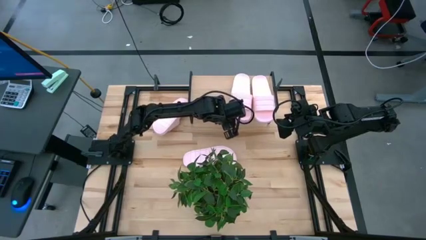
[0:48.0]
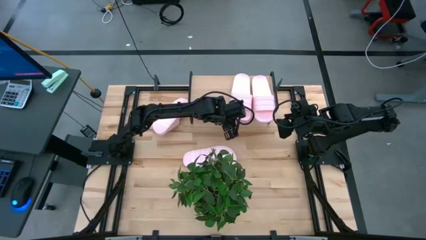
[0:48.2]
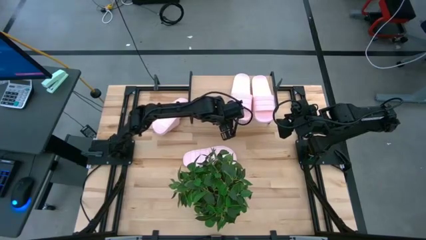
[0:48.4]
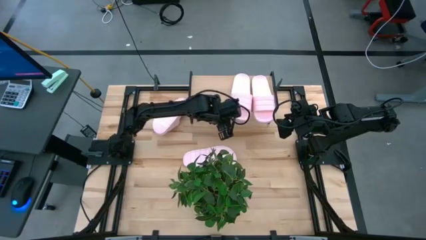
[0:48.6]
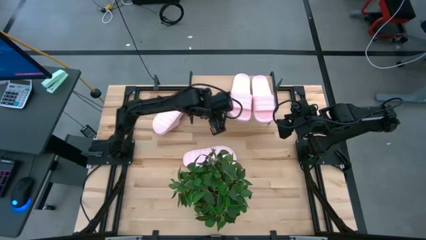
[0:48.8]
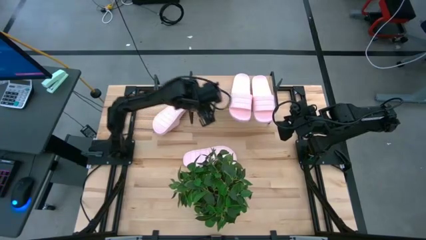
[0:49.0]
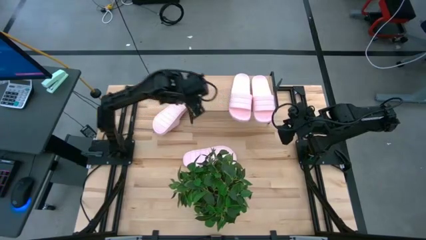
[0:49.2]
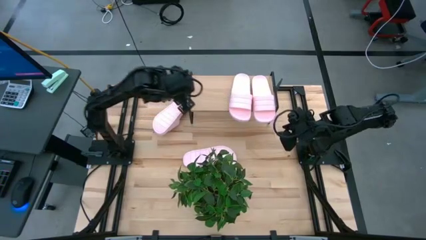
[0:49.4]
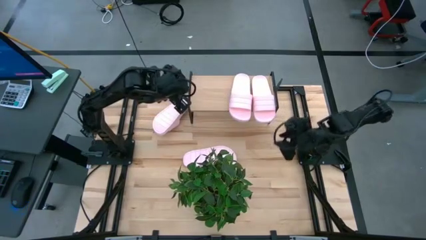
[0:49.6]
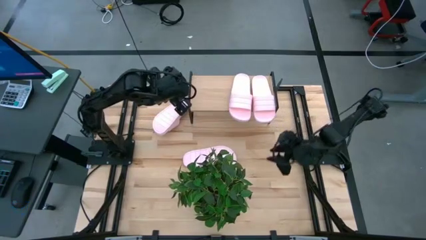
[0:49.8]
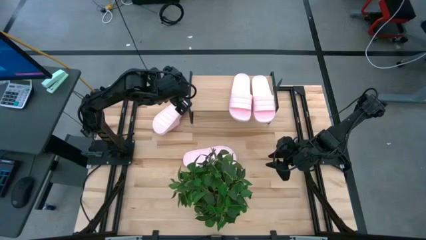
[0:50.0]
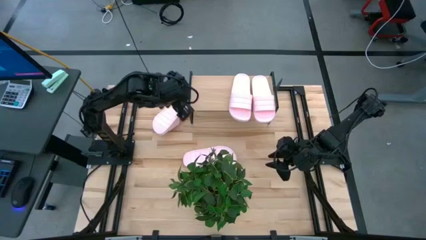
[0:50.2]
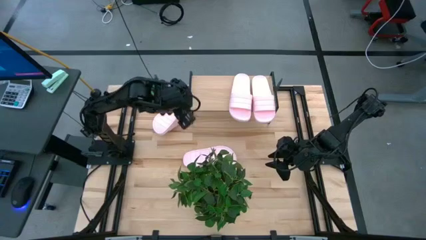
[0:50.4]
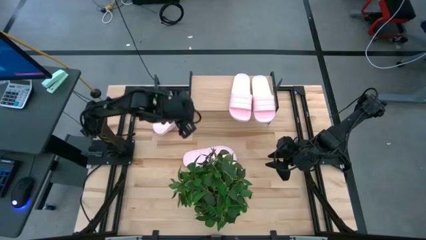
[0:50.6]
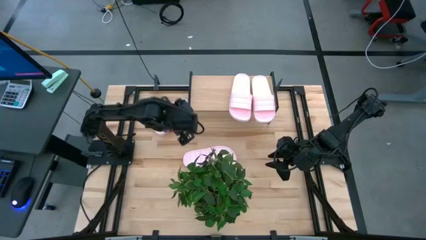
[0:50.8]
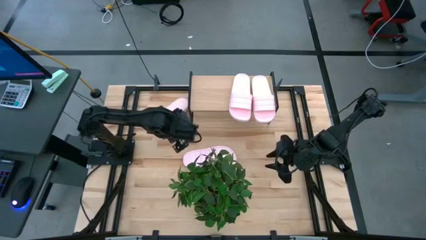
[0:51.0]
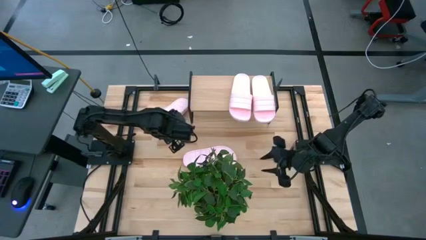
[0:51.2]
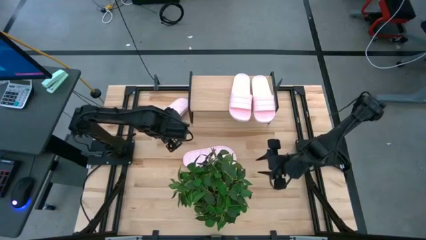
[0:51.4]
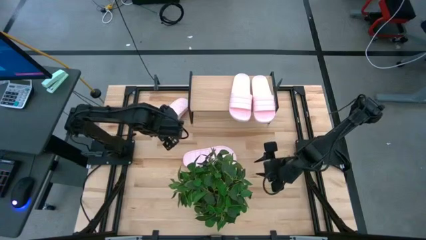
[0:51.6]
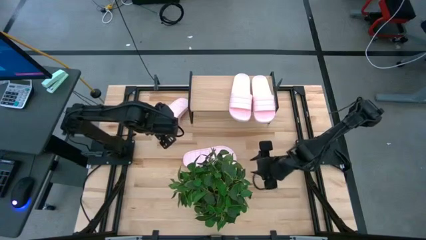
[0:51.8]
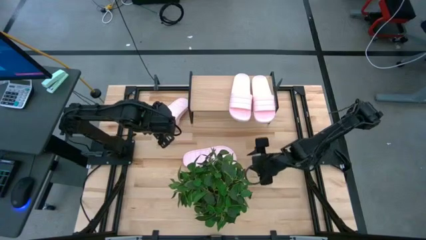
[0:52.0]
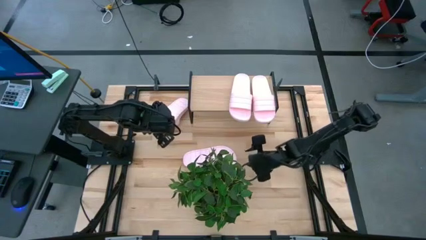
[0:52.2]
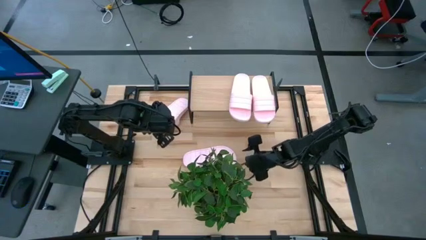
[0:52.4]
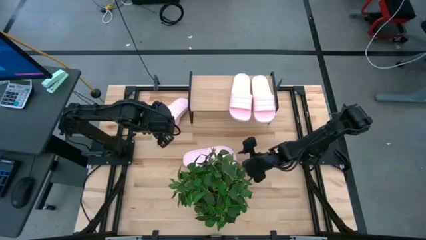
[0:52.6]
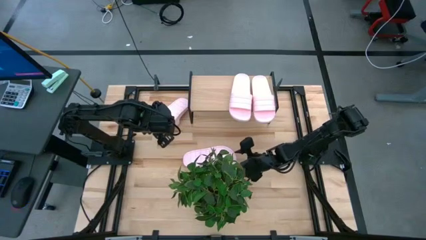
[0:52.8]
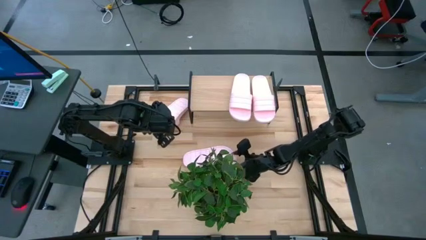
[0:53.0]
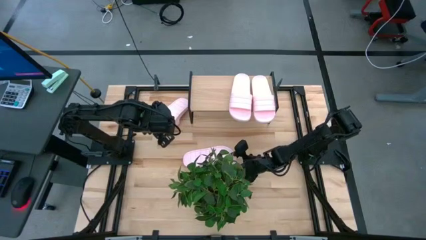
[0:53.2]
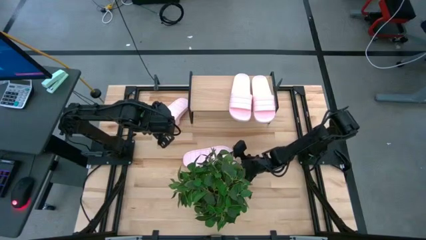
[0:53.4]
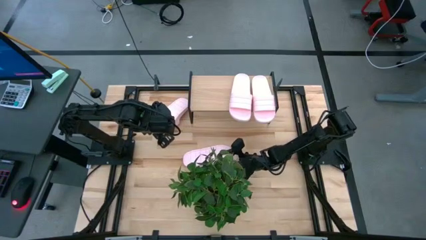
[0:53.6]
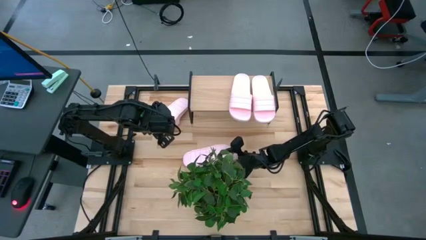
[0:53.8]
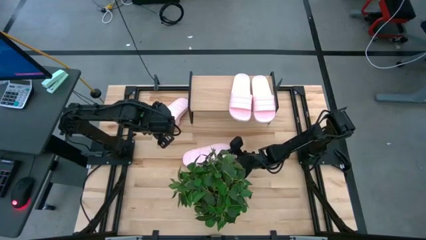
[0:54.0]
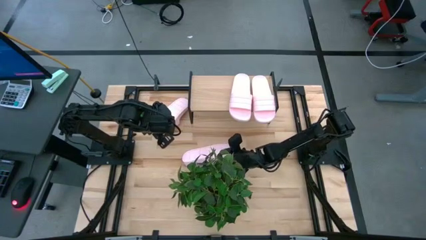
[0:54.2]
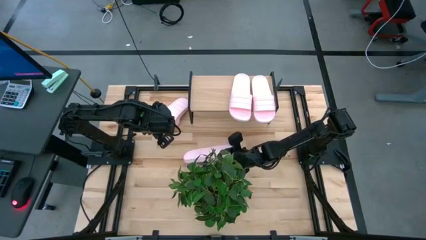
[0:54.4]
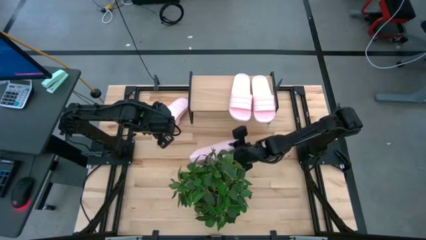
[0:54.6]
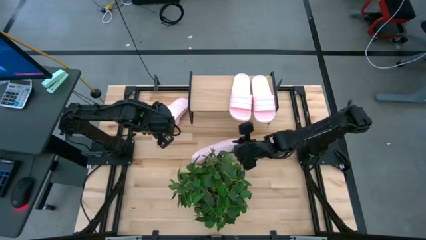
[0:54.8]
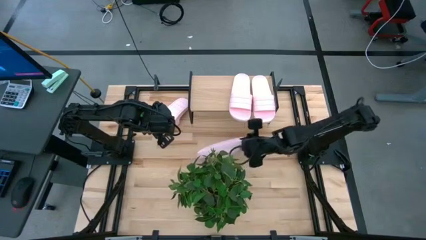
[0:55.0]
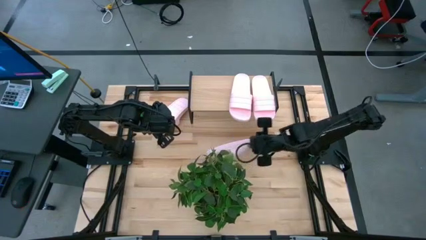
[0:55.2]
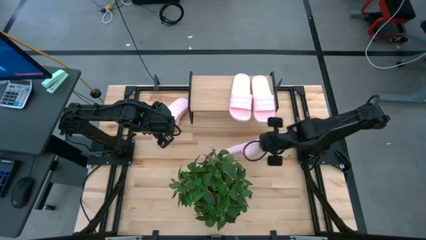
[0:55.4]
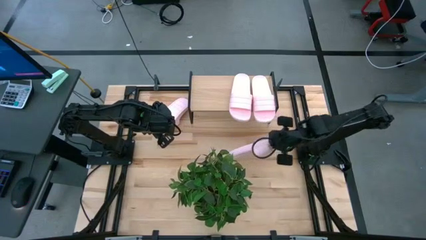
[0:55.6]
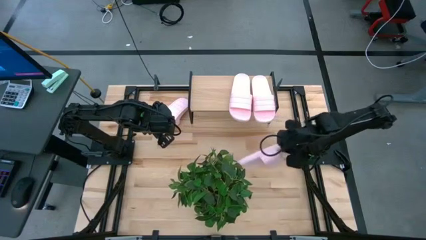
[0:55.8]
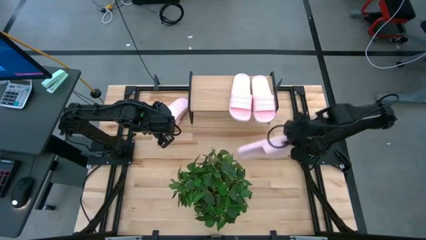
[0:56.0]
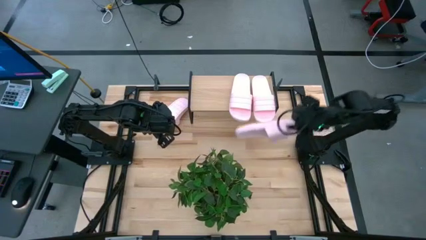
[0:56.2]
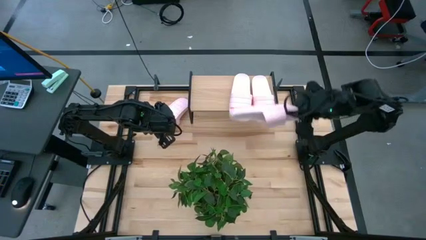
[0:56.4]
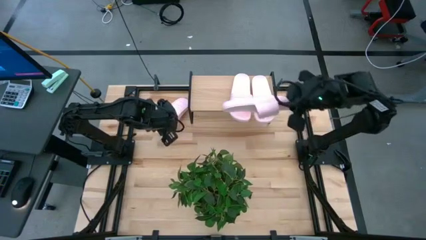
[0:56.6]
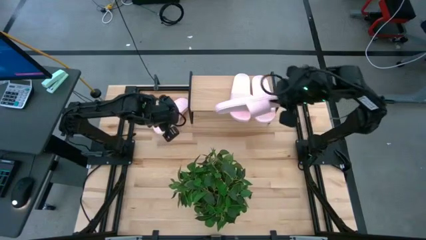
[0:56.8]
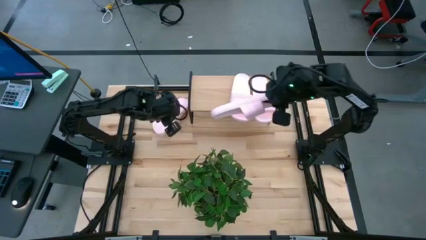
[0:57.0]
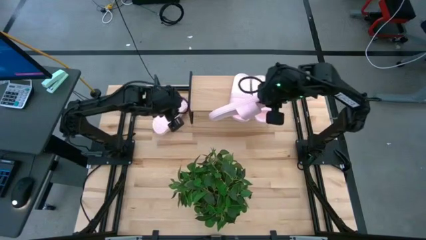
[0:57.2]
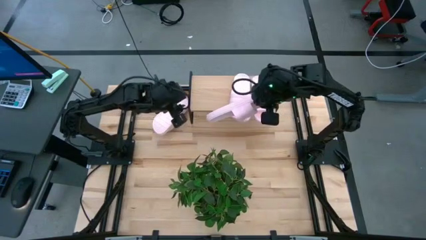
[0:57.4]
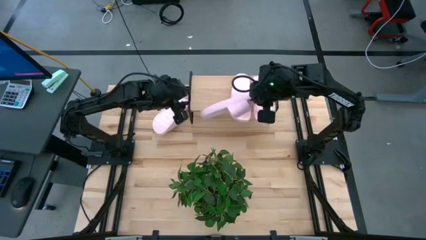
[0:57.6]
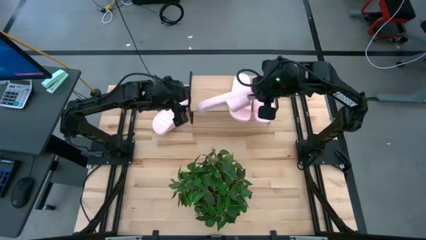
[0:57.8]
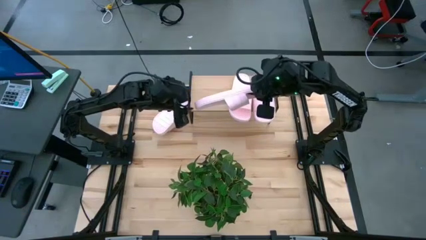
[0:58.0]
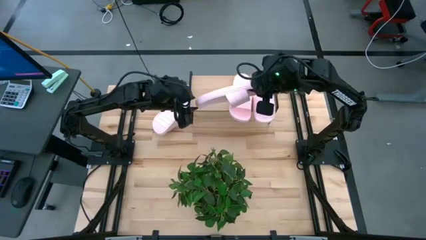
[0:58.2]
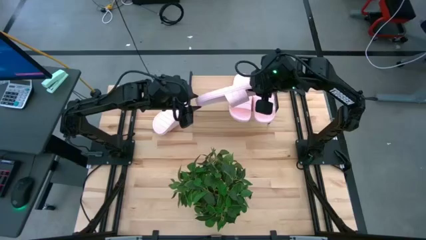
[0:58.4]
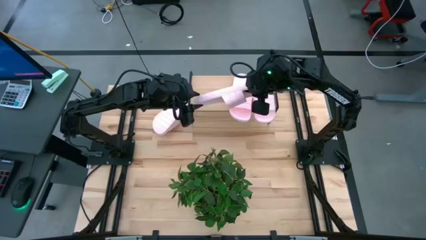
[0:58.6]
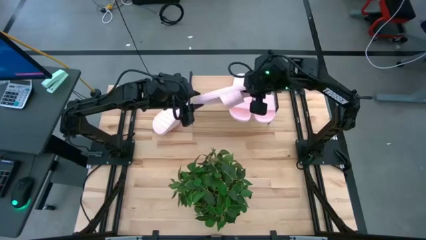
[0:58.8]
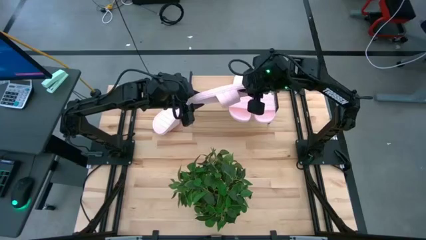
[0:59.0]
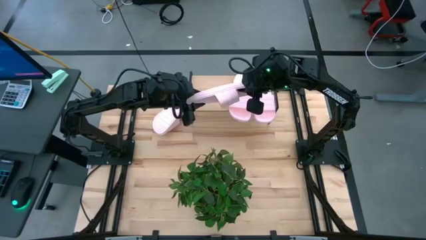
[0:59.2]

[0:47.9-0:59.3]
Task: Pick and place slides into the shelf
Put the bottom slide on the shelf

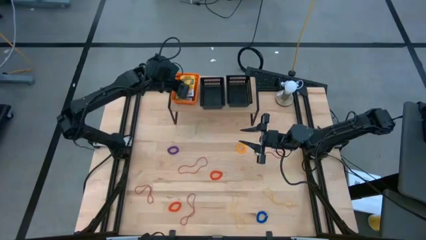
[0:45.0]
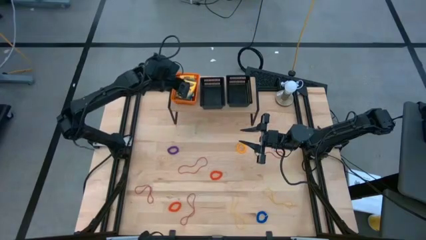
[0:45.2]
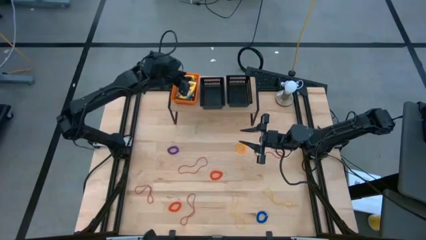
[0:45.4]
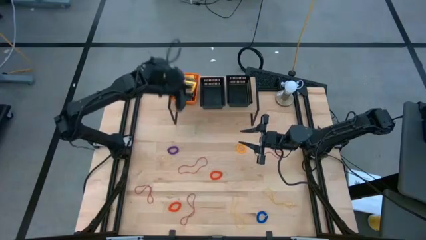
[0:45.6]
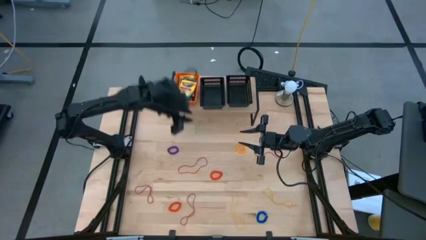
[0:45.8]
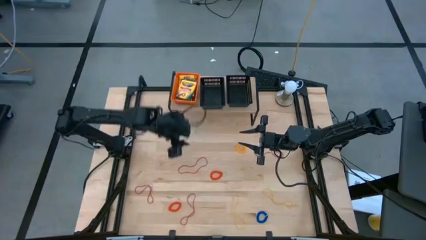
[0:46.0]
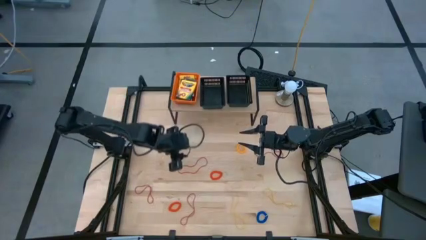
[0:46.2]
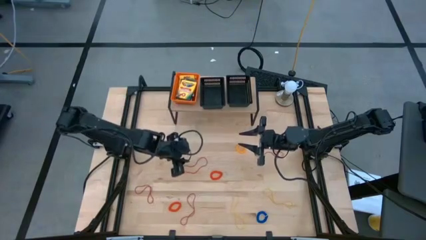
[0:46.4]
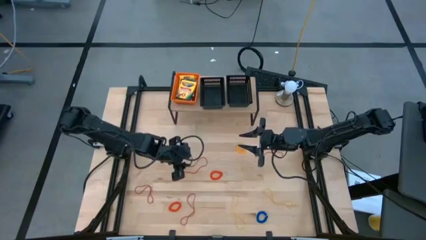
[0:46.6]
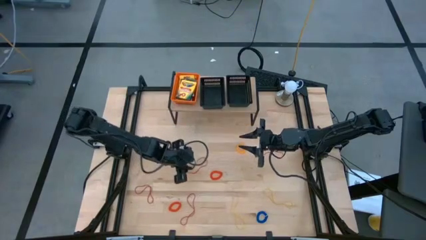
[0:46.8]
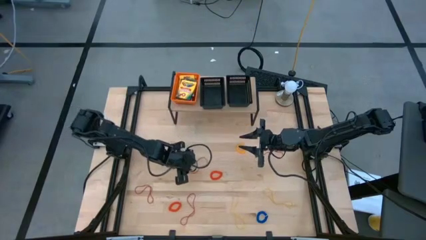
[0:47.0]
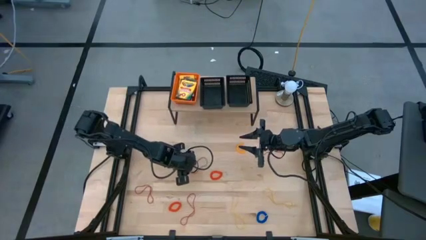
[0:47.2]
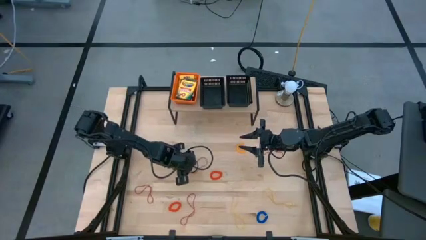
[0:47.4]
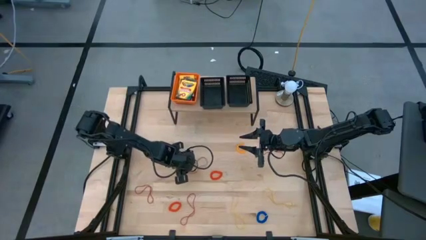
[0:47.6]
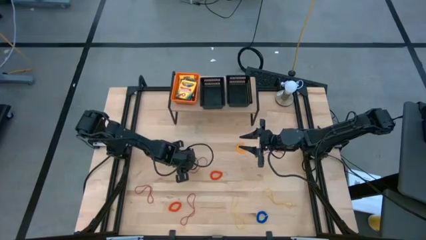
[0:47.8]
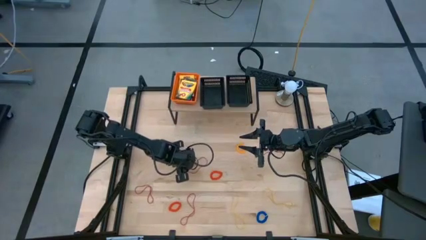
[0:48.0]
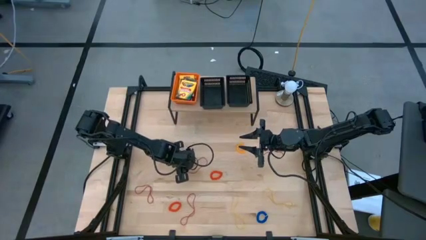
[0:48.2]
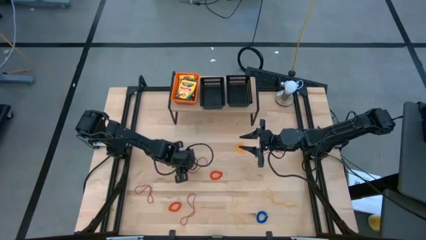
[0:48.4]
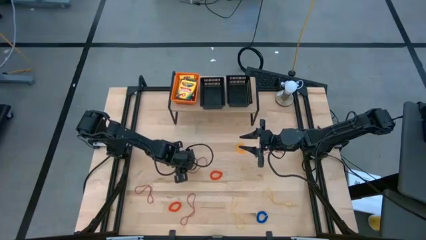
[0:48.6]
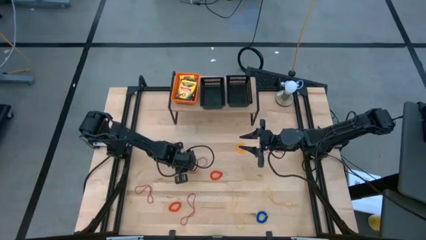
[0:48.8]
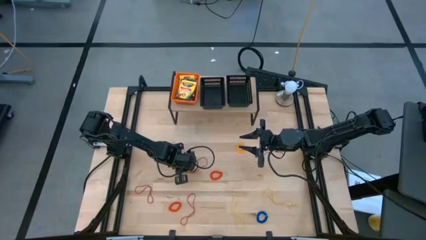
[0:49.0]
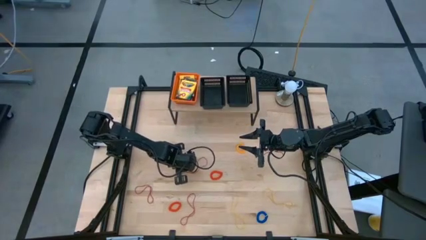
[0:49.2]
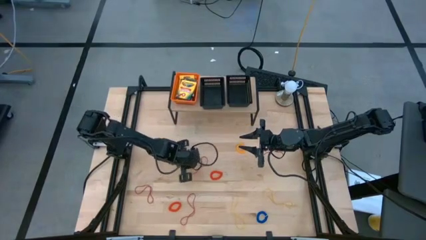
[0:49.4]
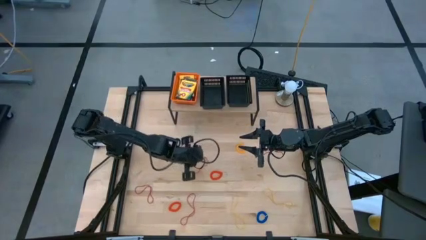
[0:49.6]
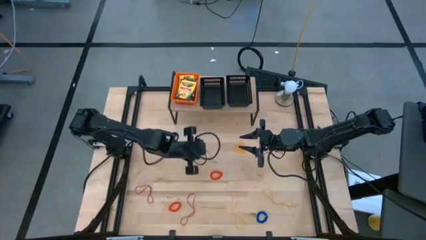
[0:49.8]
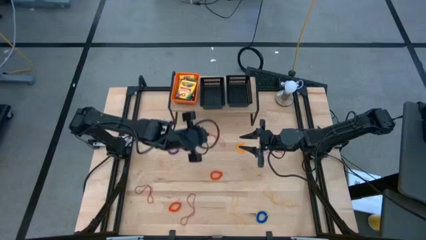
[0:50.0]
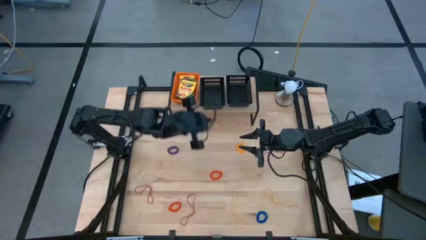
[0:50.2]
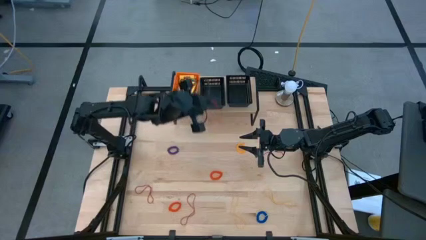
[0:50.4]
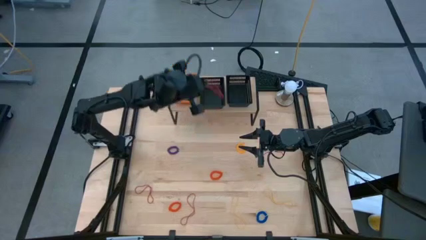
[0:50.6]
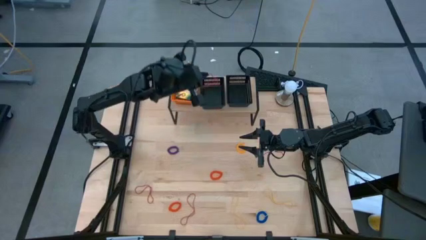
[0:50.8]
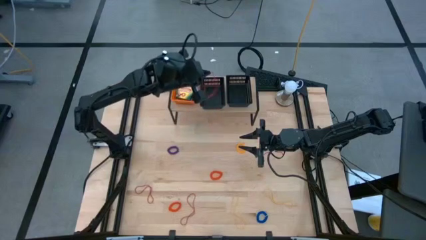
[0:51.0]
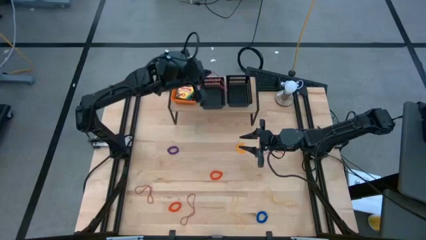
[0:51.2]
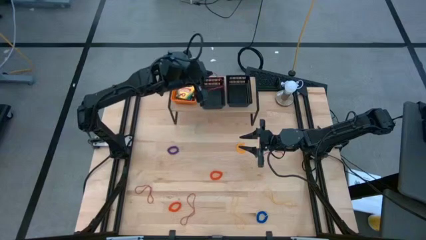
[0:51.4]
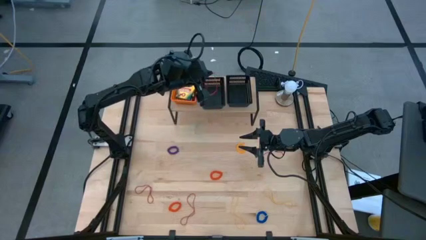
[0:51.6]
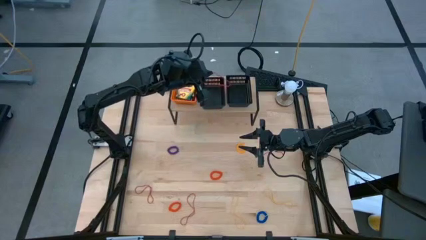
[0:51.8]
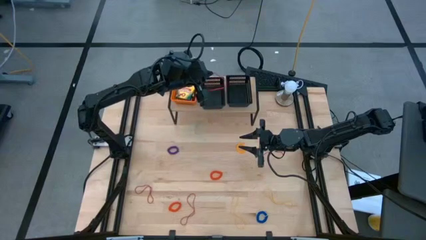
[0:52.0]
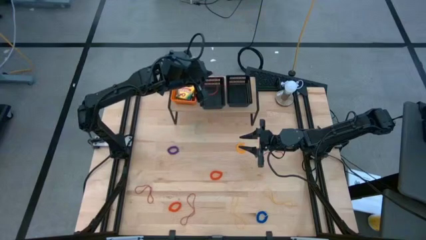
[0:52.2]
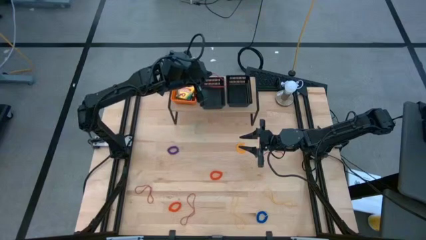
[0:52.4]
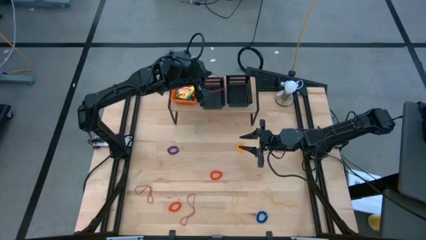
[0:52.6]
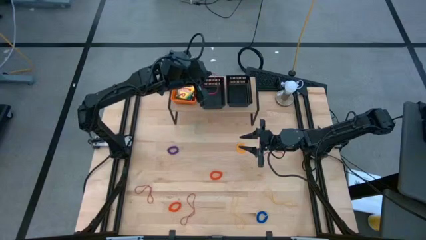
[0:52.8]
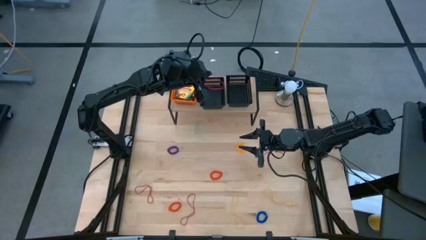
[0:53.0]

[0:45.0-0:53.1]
Task: Pick & Place Office Desk Supplies
Put the red rubber band into the left black basket on the shelf
